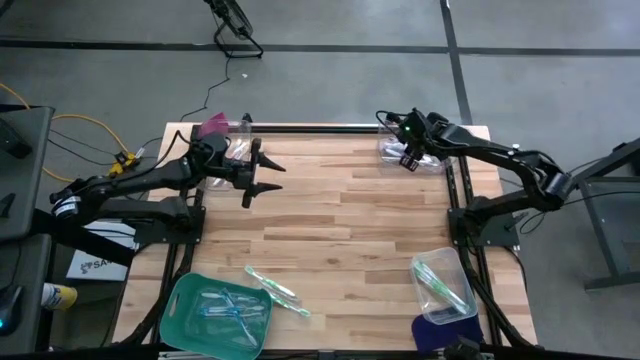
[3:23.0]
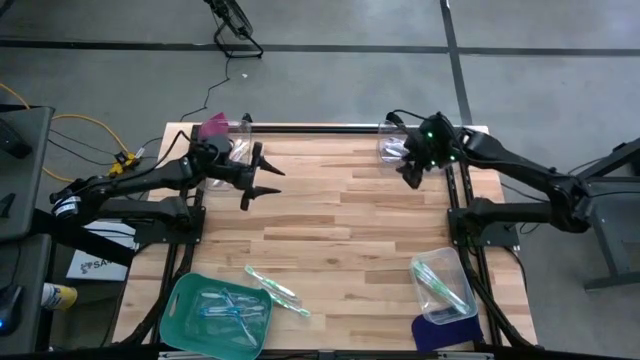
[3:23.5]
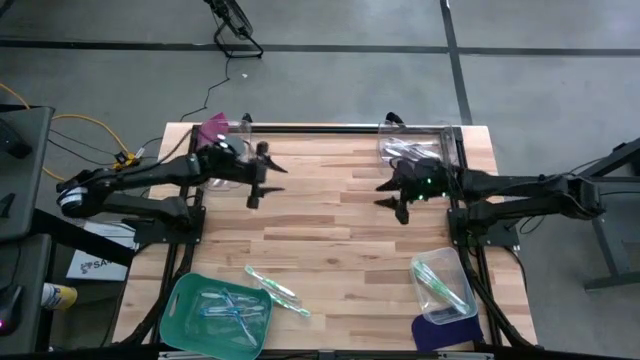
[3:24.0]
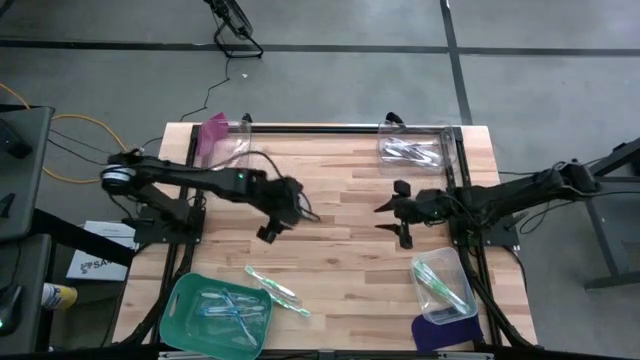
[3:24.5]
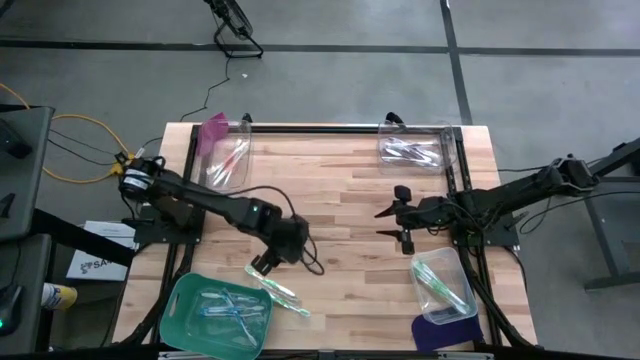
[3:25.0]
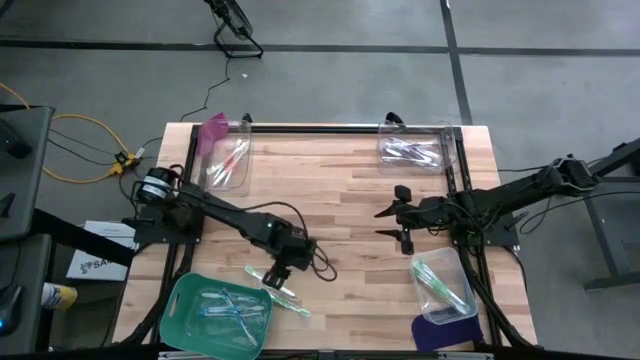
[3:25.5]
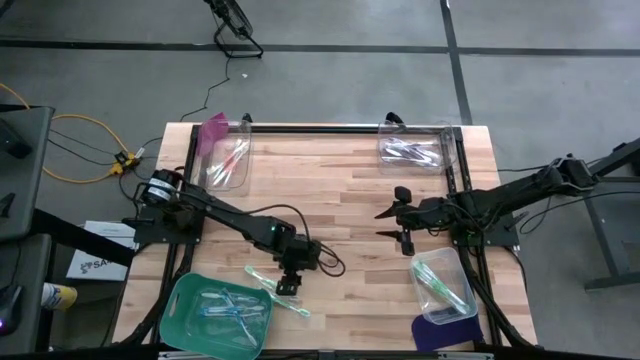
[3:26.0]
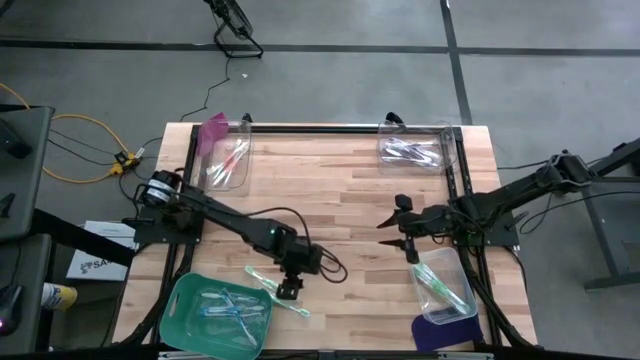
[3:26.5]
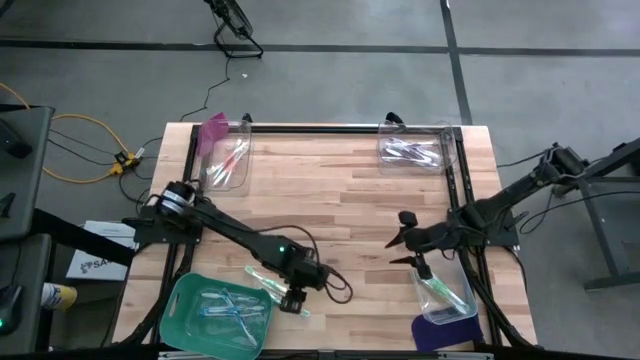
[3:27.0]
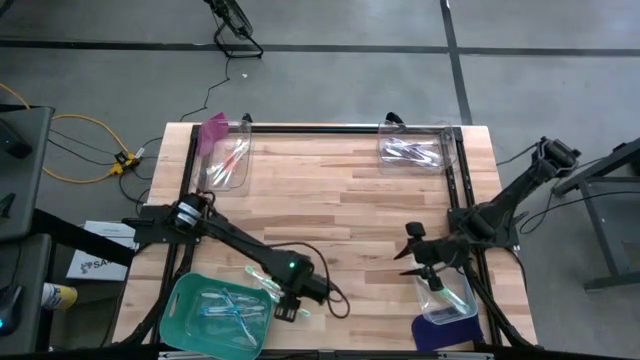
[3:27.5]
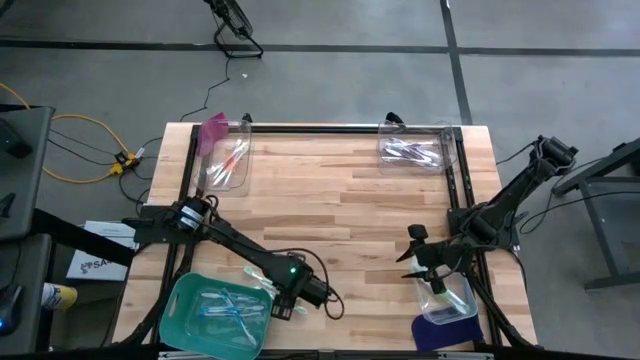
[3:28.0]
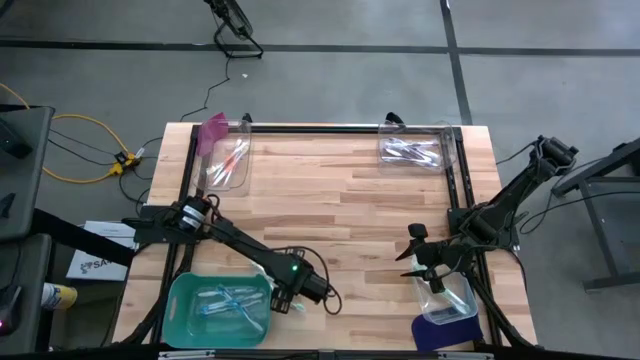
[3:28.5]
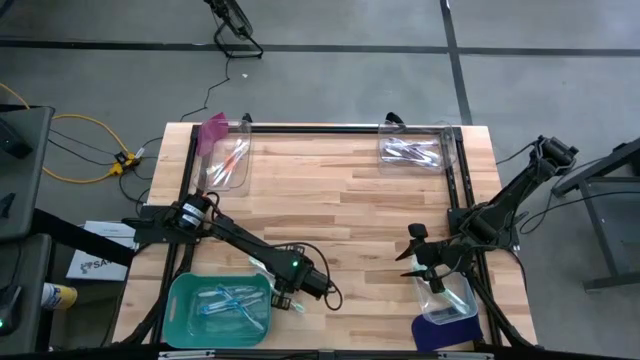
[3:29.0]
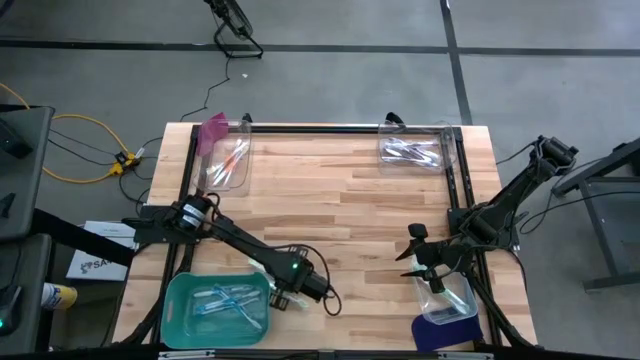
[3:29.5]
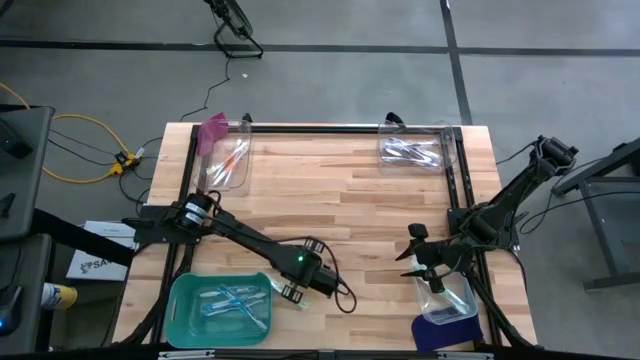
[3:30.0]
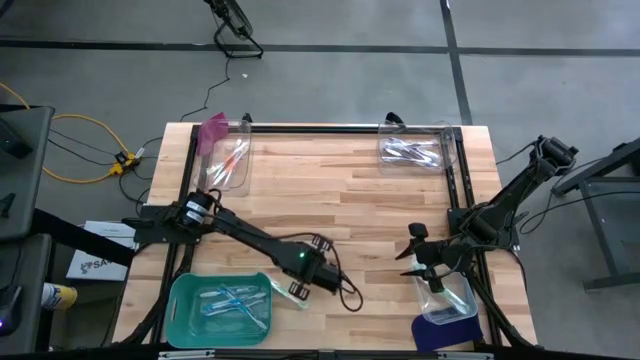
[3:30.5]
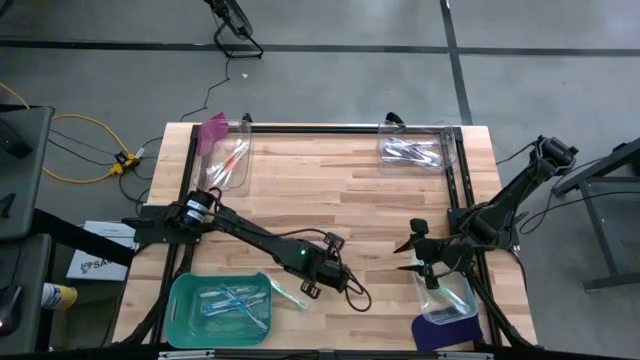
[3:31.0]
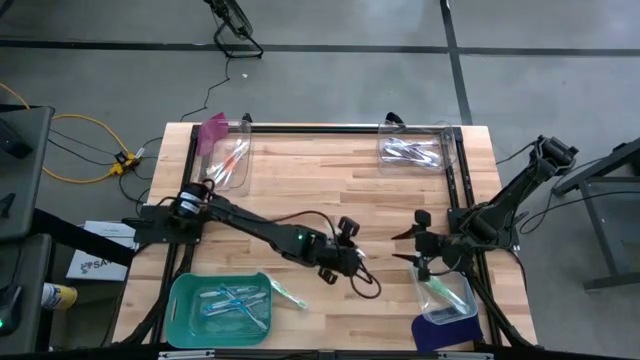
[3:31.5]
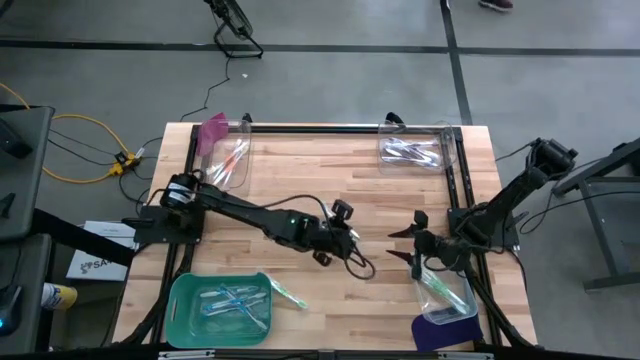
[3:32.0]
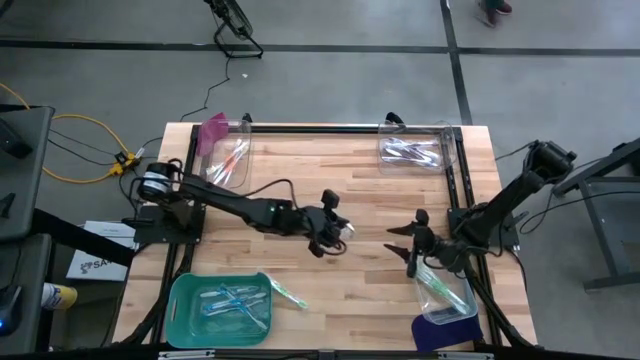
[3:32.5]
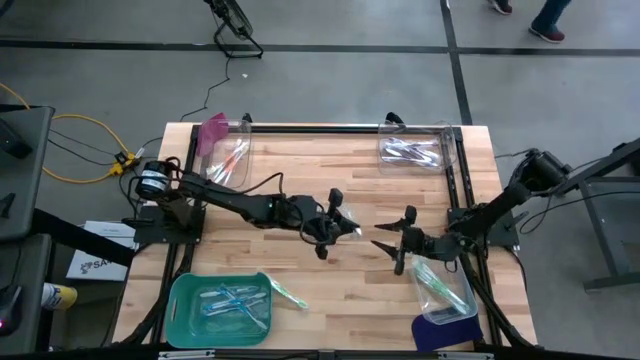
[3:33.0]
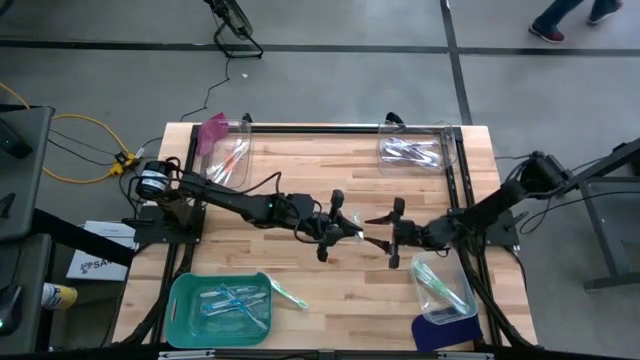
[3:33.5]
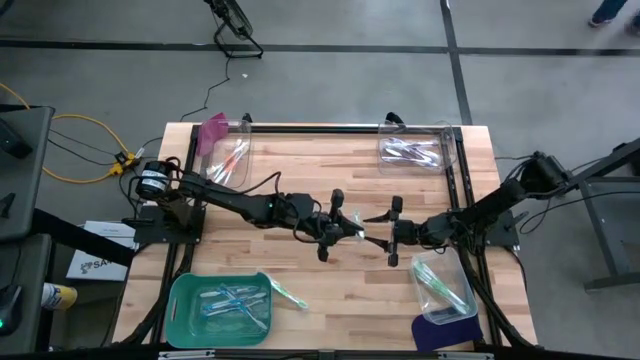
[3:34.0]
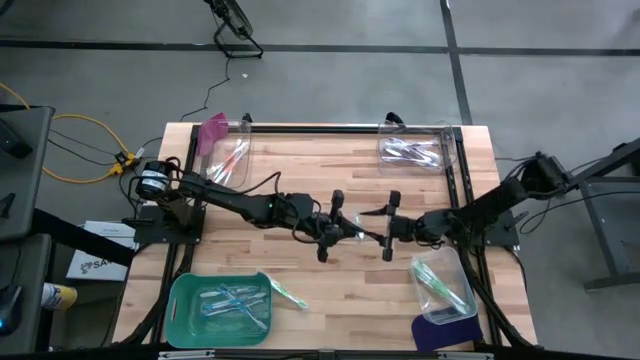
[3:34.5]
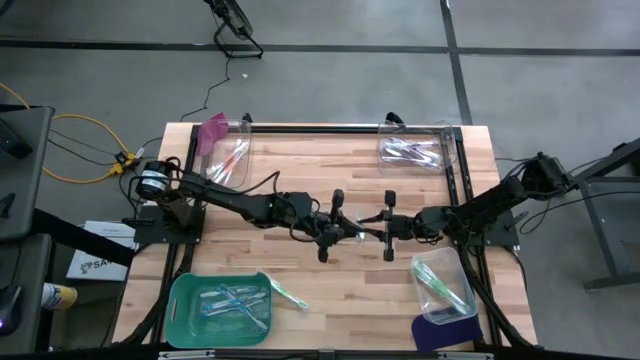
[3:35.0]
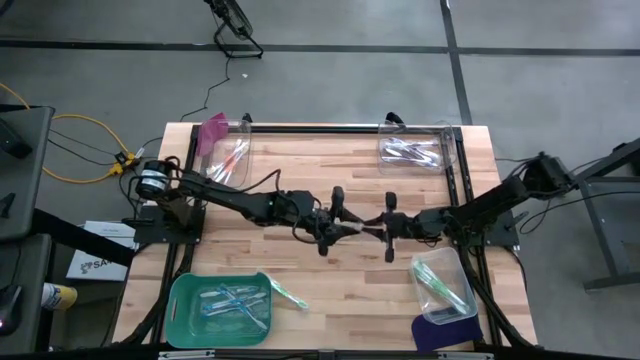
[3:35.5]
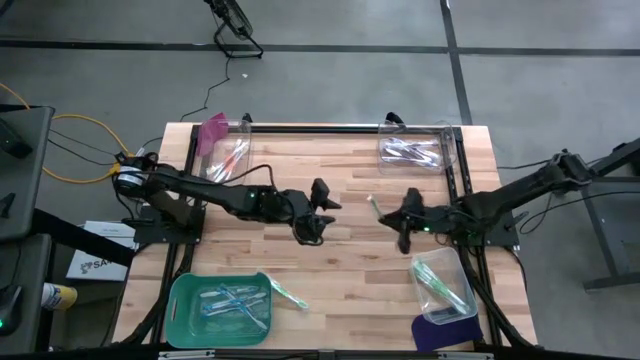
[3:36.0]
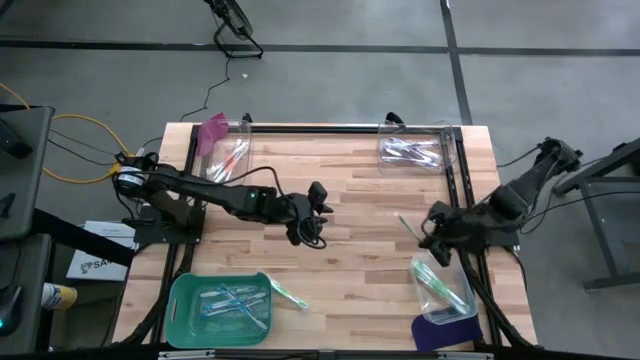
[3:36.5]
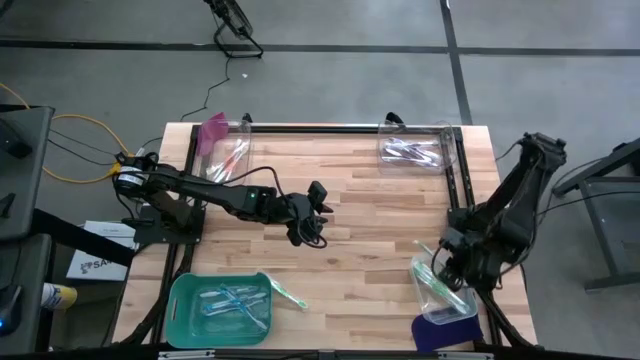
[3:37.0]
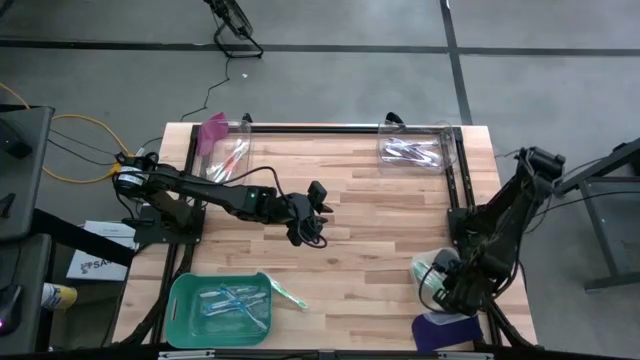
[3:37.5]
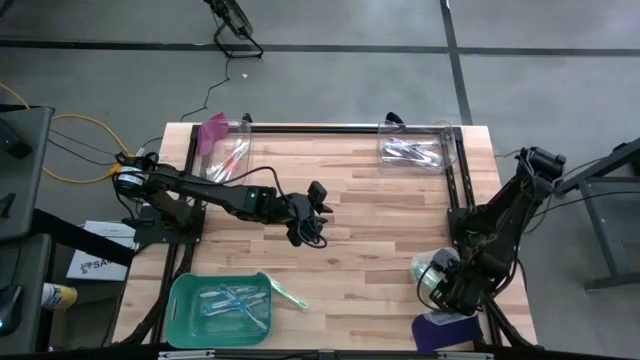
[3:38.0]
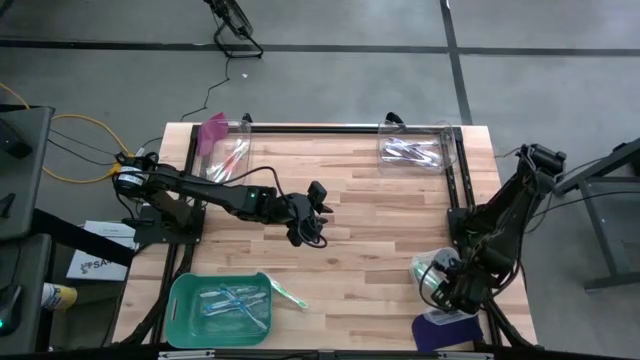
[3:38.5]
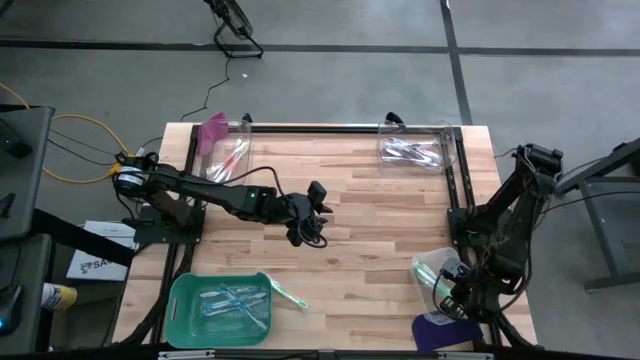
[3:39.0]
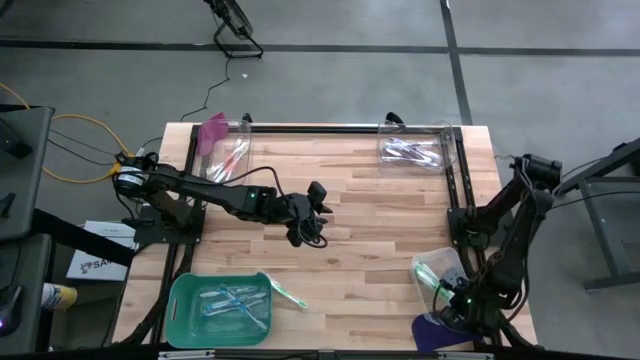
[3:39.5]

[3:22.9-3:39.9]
Task: Pick & Place Toothbrushes
Put the green toothbrush into the white bin

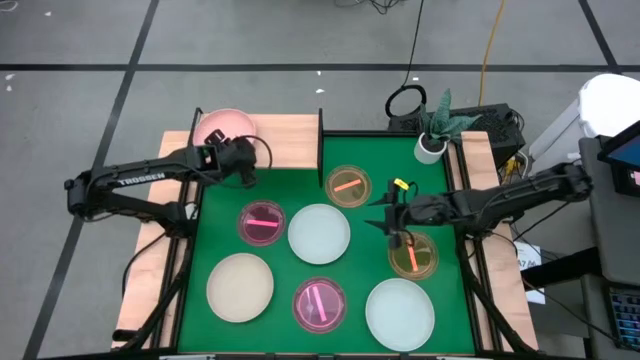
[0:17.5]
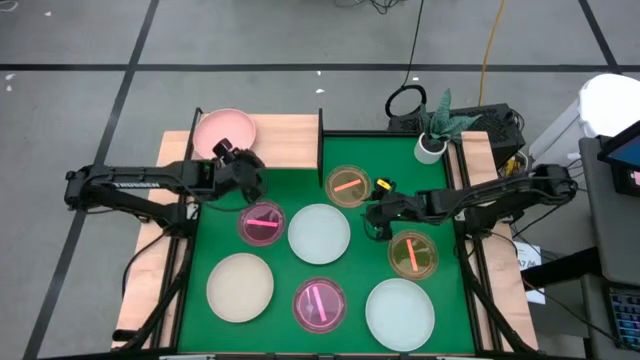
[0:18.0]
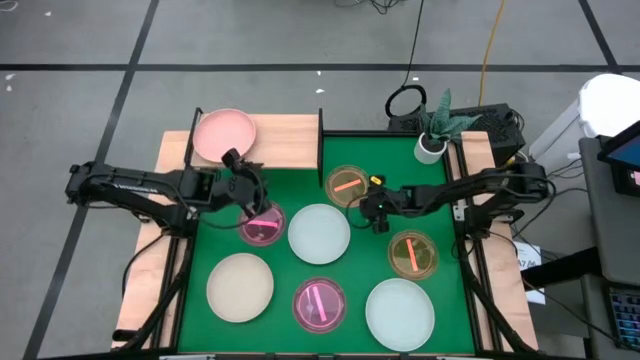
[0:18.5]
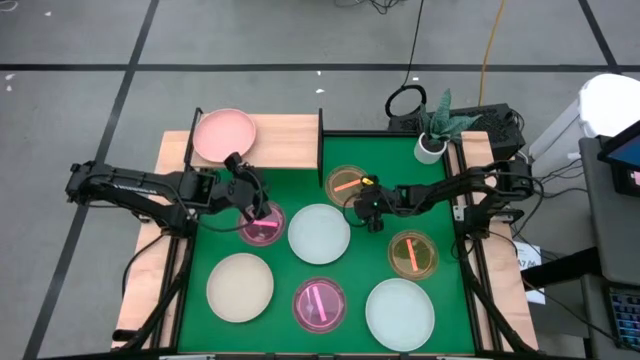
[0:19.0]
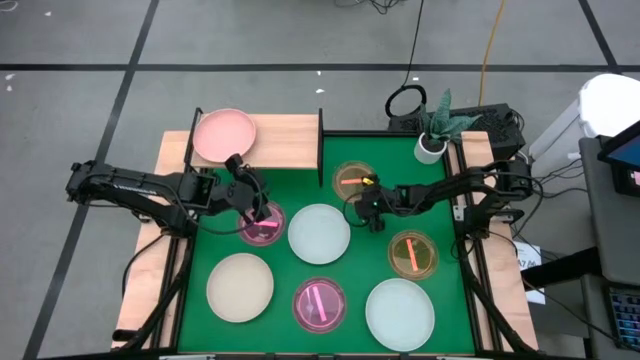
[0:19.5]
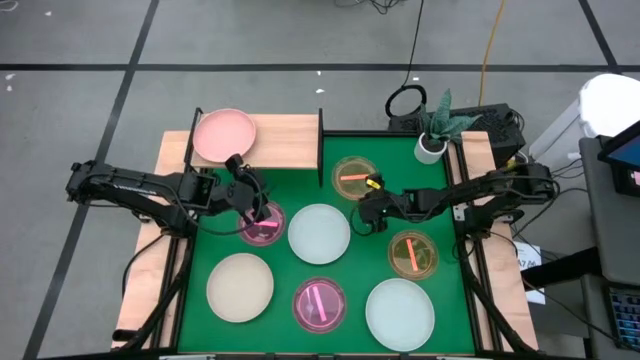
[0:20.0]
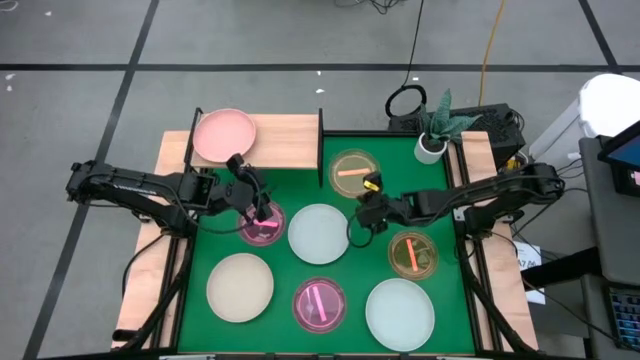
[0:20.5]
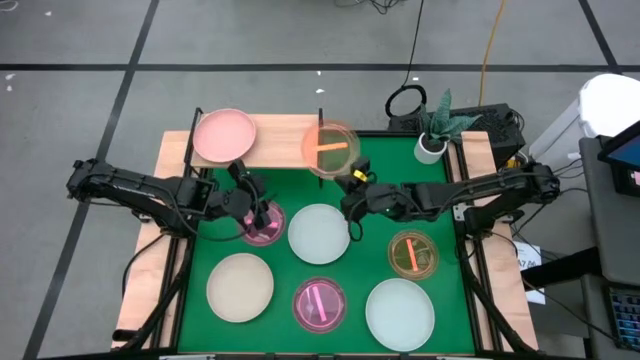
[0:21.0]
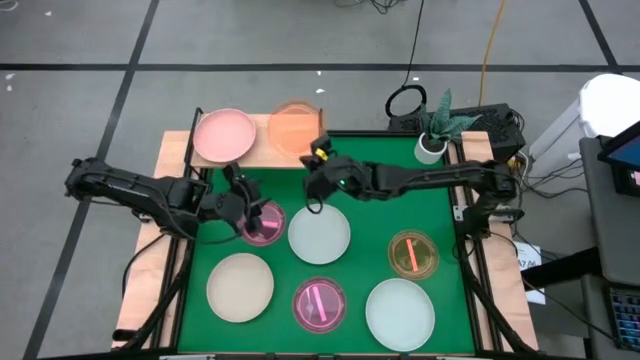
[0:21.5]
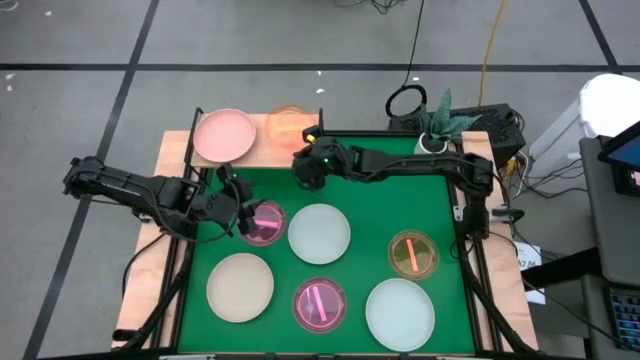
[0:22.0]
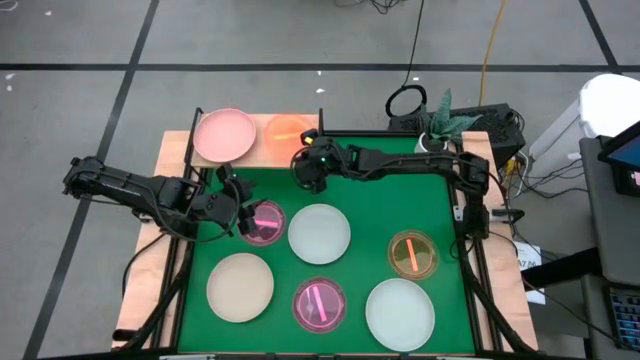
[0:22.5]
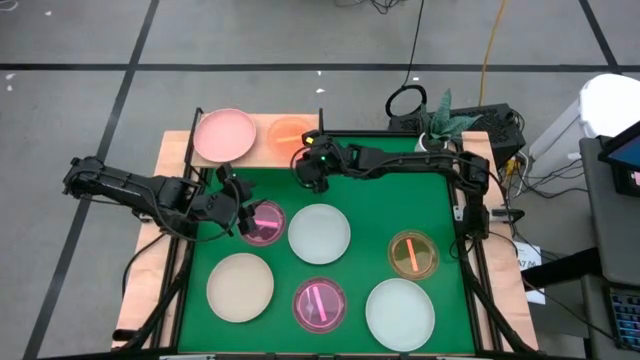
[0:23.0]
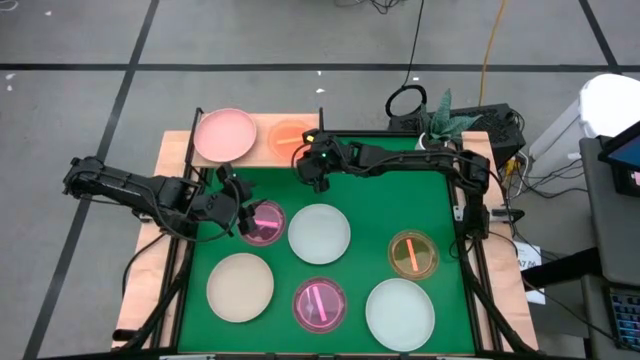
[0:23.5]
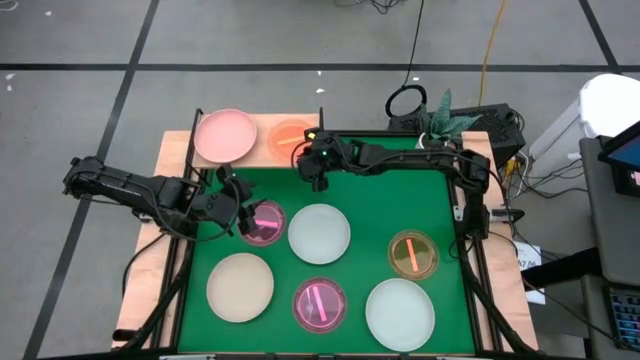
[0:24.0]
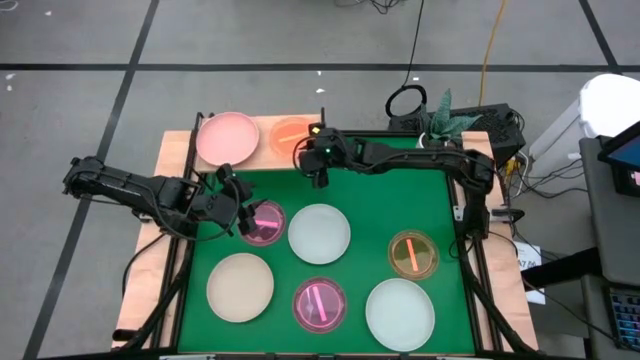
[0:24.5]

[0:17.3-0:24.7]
Task: Place and stack plates onto a shelf
Put the top orange plate on the shelf
